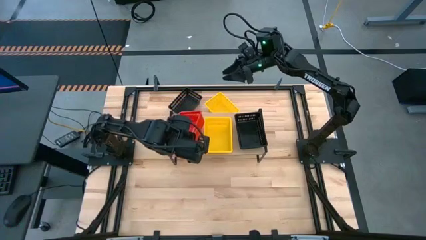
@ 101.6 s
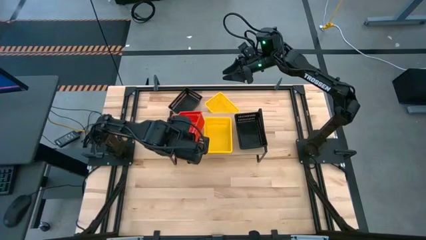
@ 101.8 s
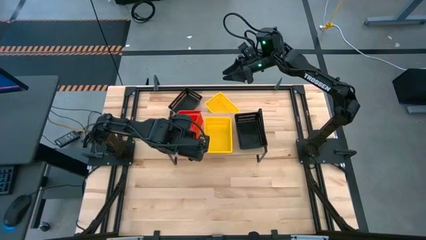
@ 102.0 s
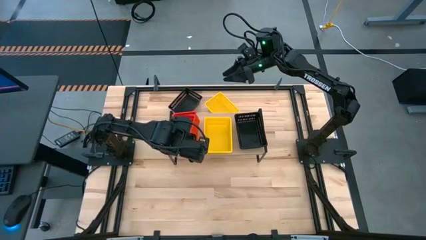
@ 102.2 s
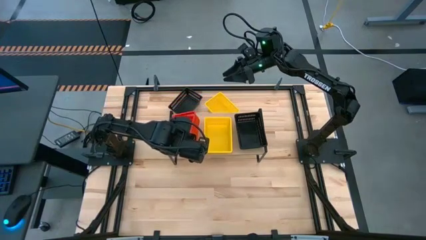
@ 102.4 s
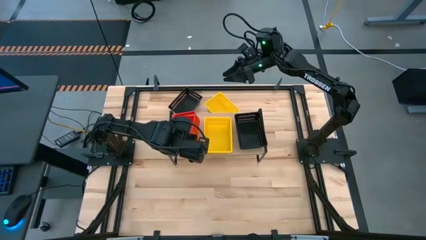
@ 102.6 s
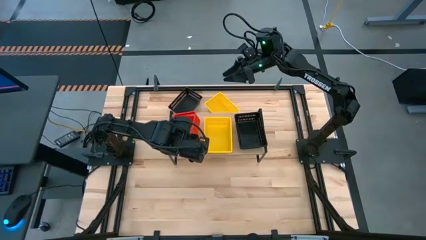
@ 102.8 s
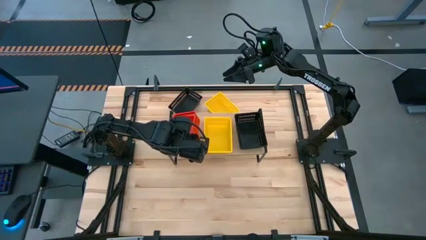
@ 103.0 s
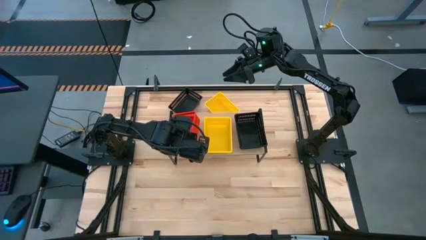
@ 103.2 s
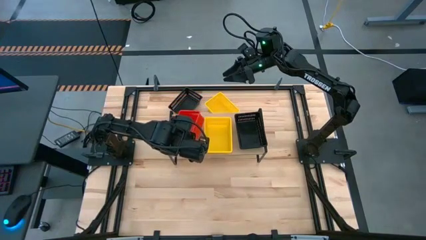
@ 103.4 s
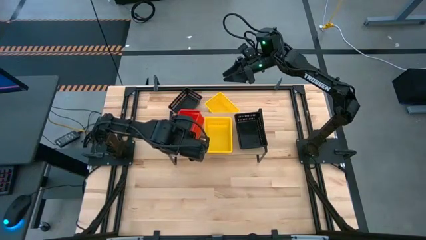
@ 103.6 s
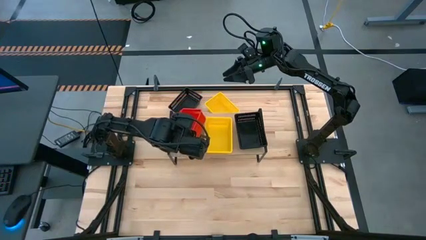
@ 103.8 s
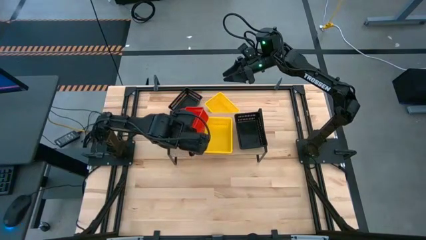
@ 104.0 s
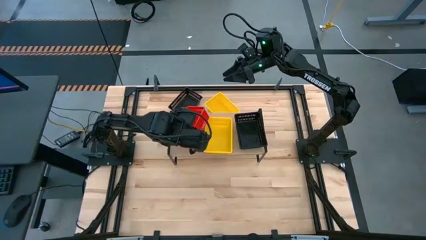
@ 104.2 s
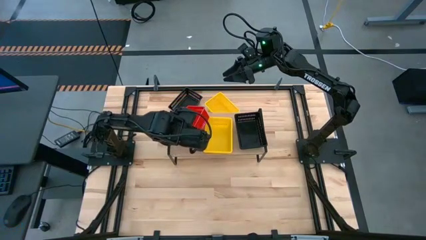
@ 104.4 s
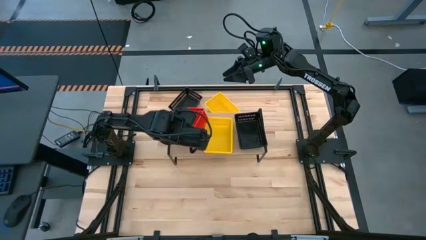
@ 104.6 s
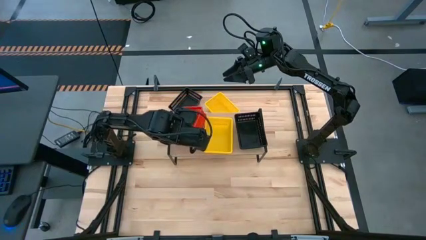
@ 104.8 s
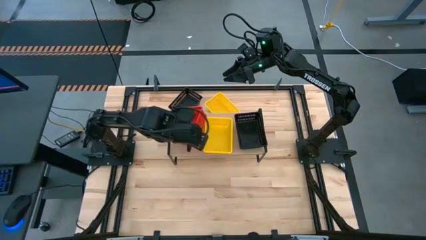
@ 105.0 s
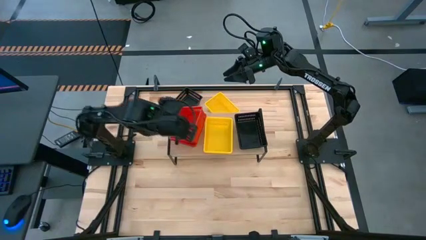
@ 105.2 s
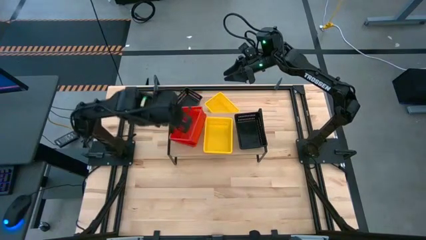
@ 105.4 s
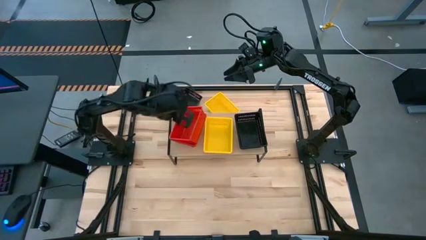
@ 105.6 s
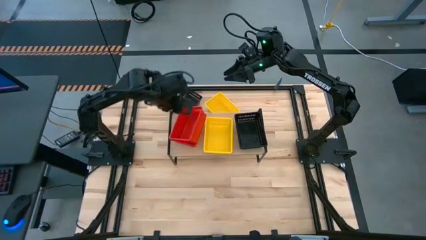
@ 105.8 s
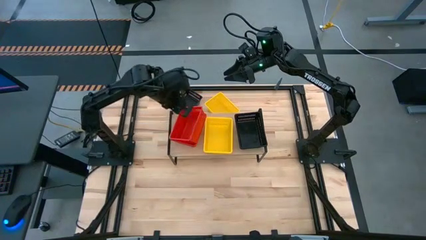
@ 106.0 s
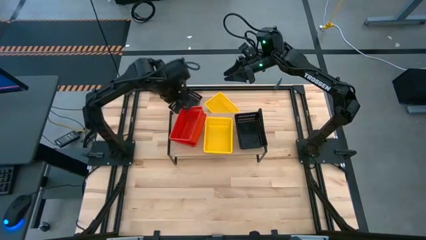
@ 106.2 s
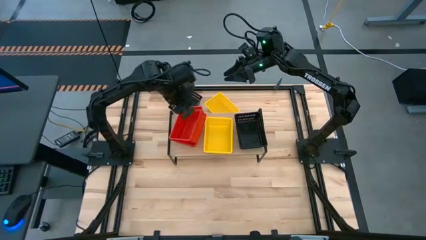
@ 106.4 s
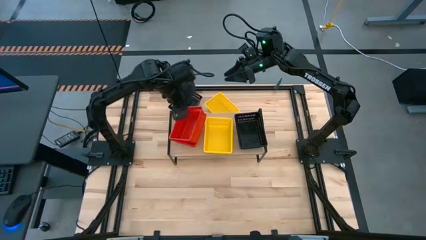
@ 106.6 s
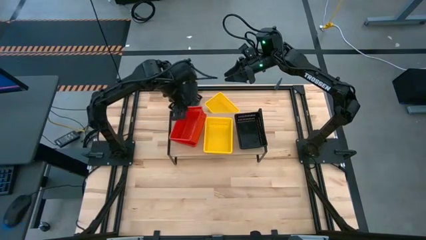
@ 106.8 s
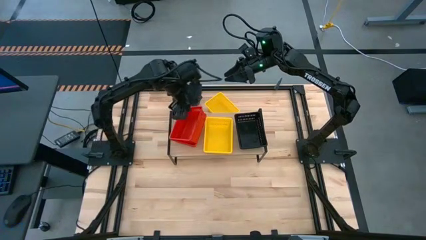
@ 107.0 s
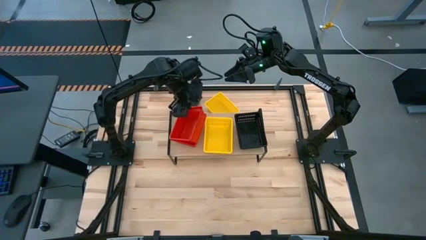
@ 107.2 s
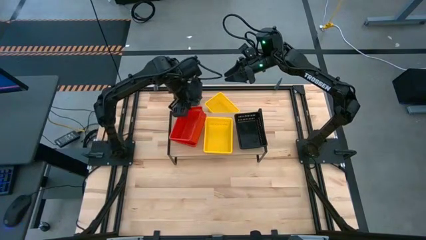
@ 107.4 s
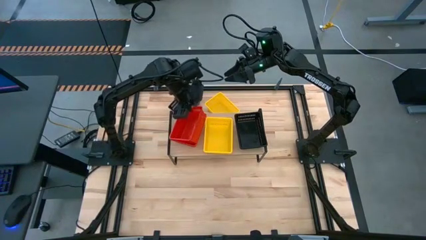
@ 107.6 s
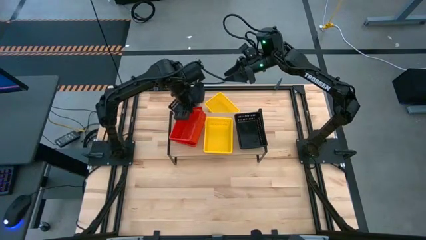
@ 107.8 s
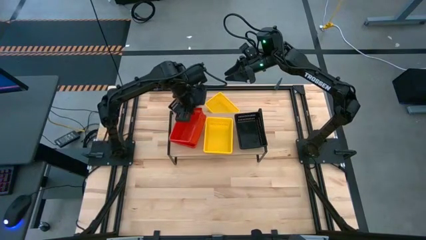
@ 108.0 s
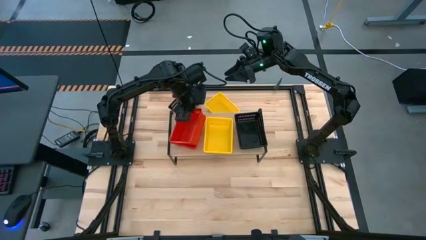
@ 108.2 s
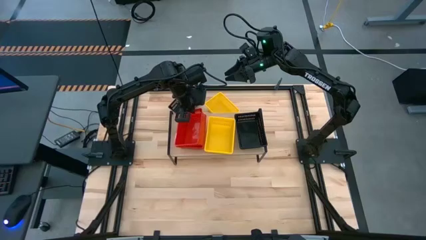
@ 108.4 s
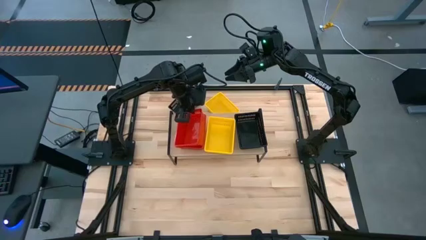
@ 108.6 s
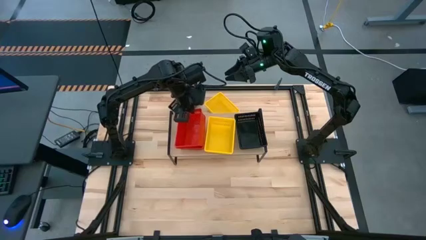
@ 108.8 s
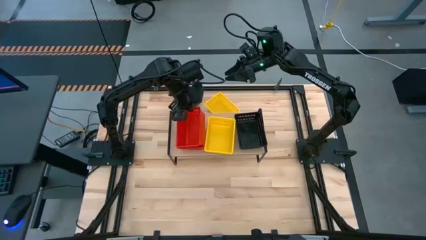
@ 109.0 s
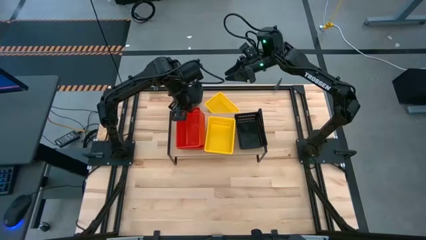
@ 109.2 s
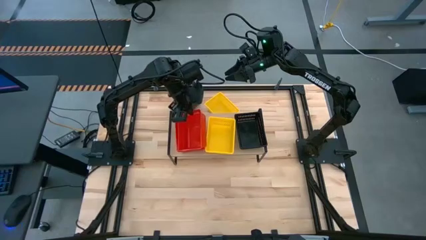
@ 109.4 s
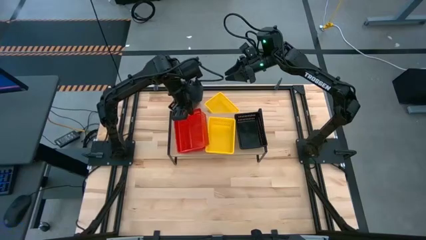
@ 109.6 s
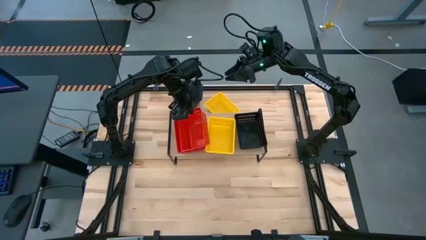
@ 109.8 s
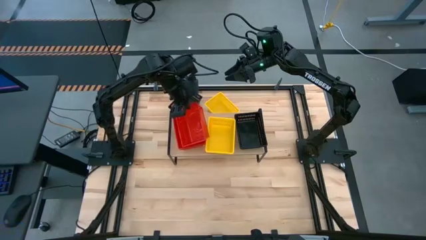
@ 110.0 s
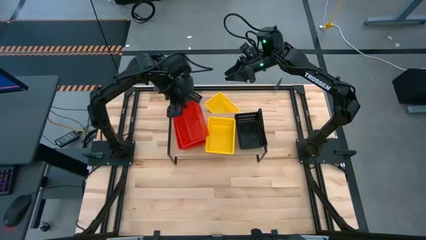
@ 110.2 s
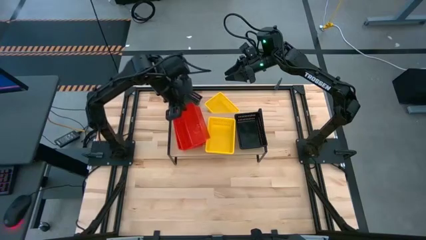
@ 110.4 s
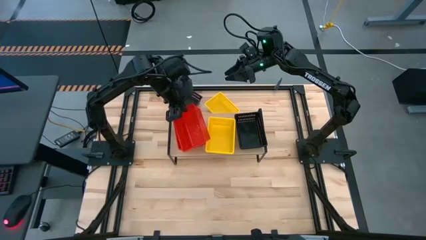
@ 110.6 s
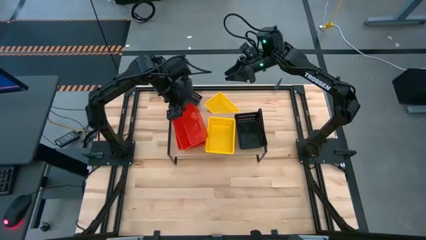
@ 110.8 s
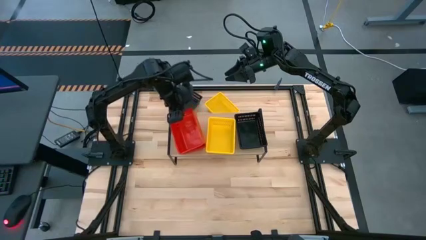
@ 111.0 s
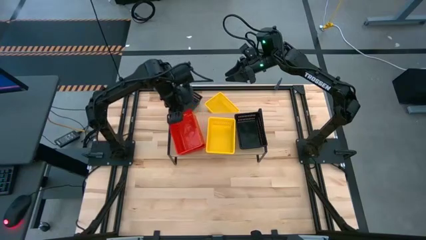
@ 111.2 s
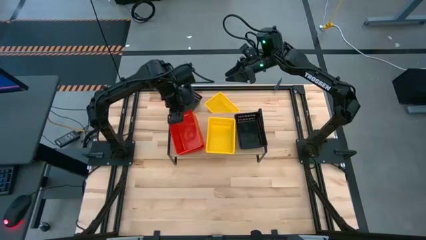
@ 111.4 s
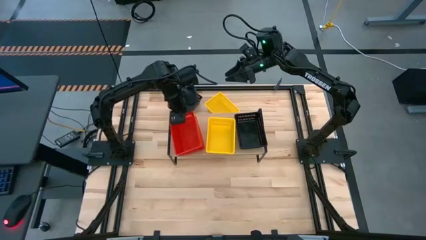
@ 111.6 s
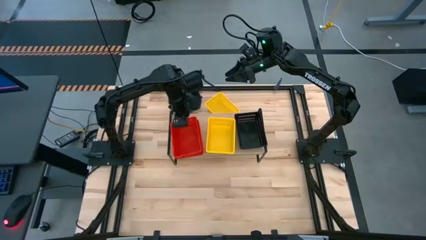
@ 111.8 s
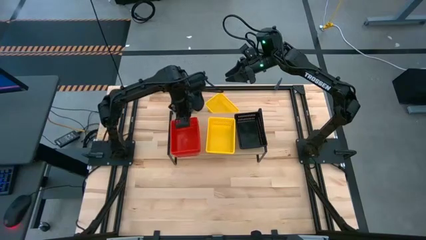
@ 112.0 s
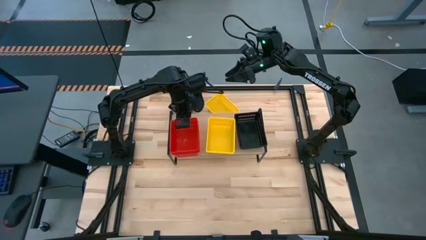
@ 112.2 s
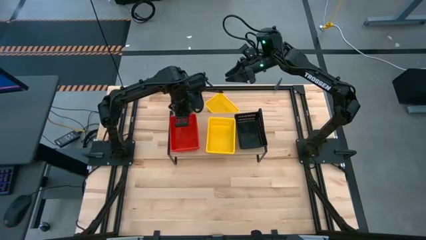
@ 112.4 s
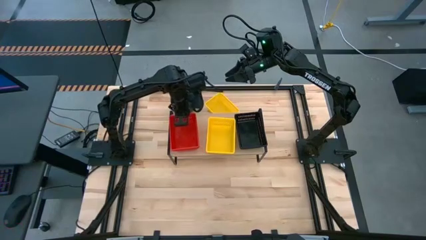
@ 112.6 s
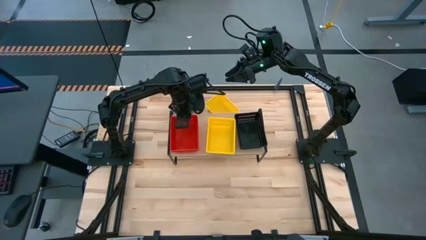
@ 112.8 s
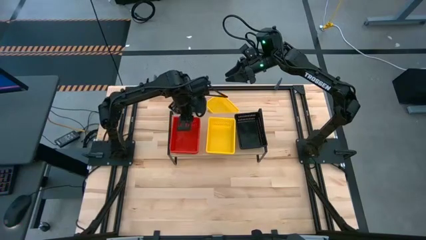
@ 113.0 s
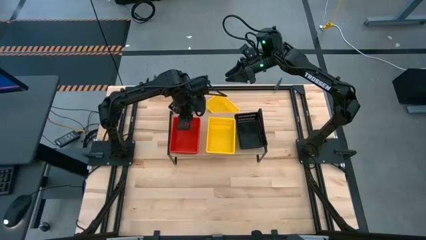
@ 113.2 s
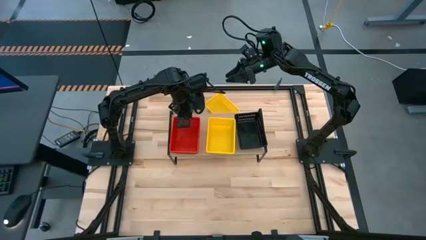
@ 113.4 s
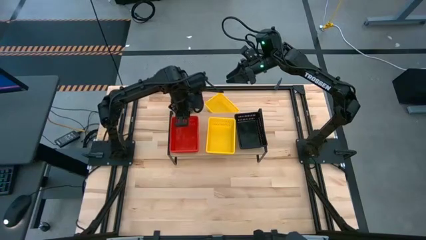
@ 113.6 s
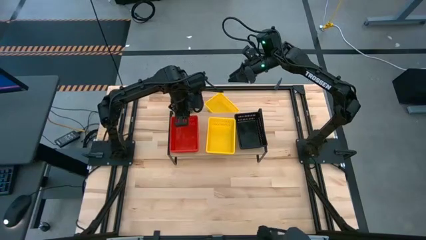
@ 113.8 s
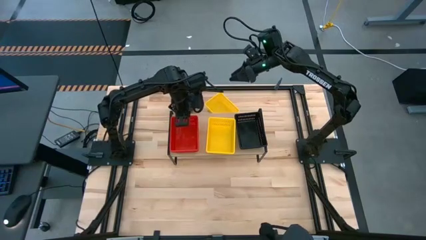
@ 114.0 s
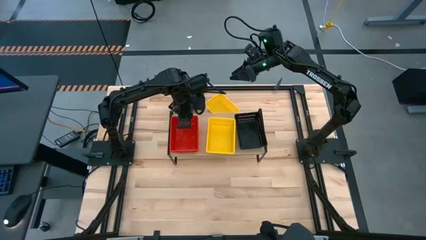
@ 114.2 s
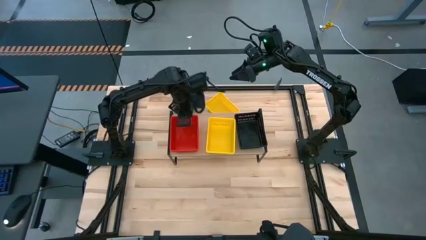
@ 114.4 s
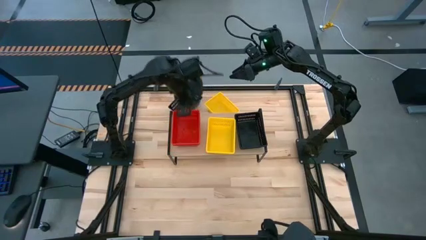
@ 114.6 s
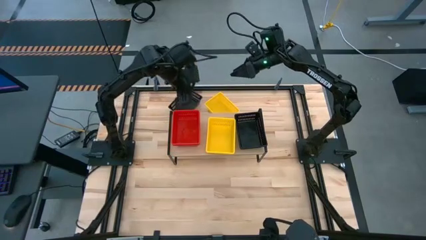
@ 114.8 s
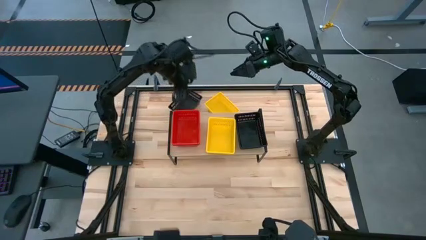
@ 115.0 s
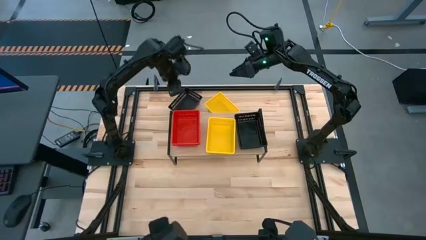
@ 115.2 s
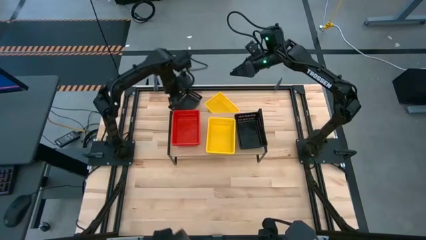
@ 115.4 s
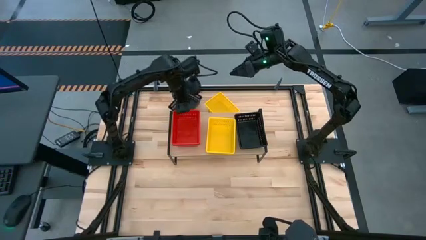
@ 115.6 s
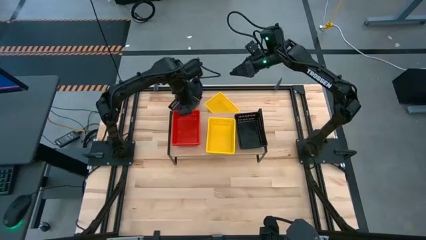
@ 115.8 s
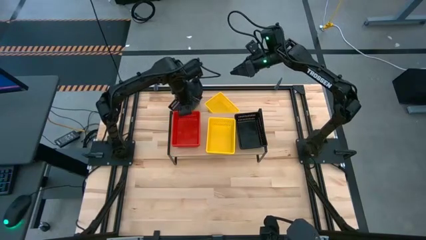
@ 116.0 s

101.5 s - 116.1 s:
Task: Stack baskets on shelf by color
Stack the red bin on top of the red bin on the shelf

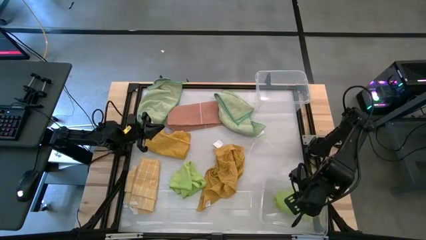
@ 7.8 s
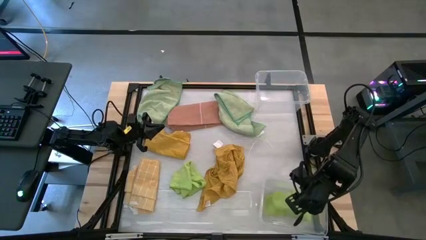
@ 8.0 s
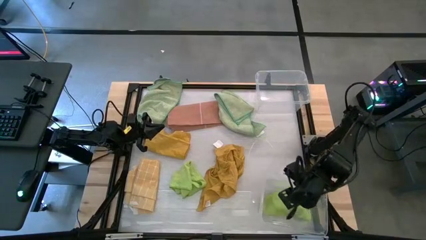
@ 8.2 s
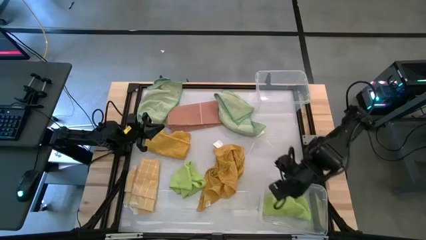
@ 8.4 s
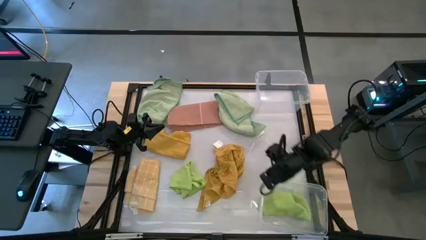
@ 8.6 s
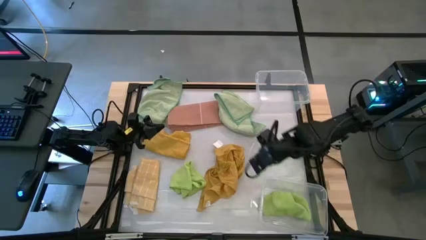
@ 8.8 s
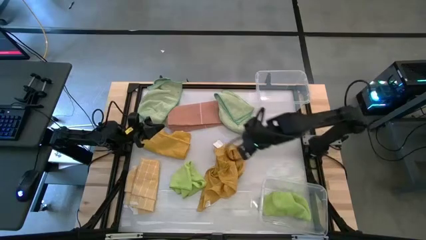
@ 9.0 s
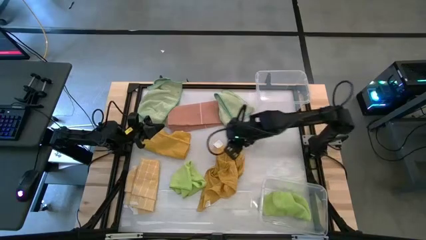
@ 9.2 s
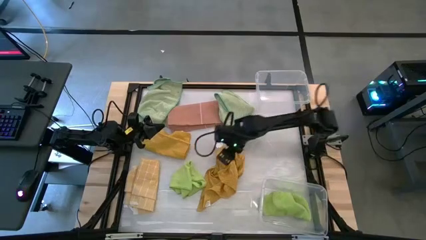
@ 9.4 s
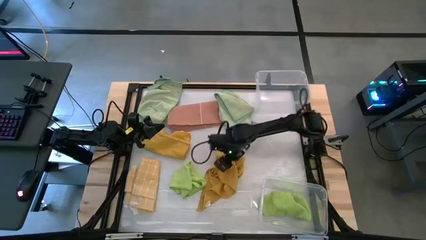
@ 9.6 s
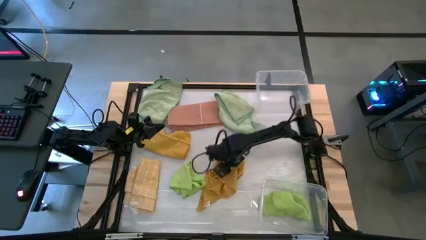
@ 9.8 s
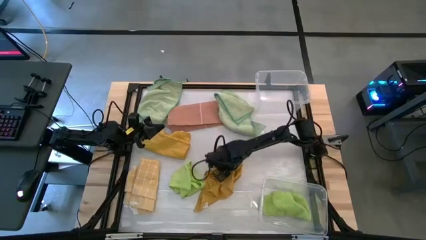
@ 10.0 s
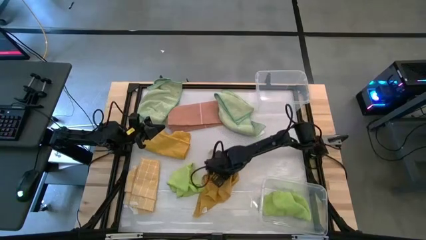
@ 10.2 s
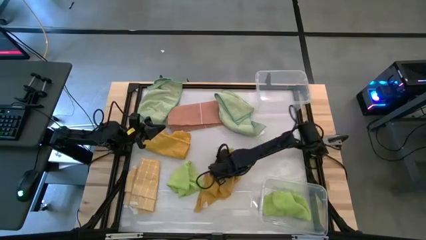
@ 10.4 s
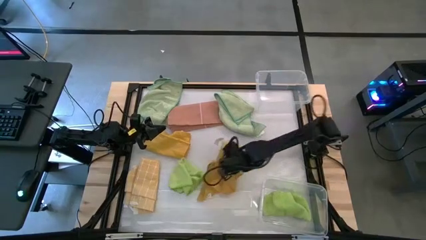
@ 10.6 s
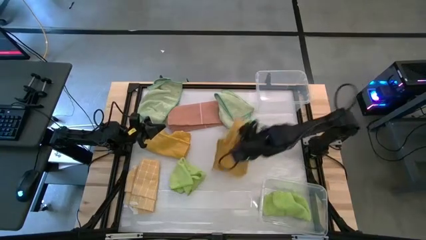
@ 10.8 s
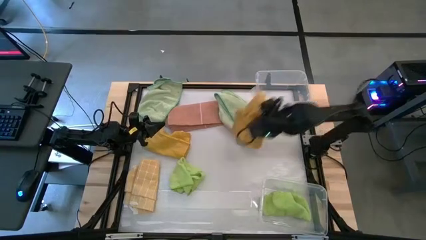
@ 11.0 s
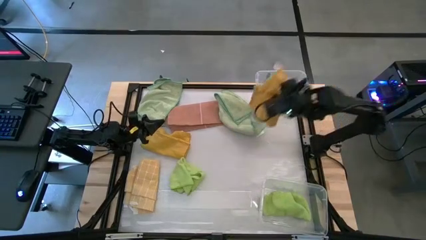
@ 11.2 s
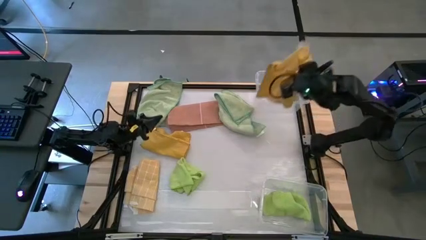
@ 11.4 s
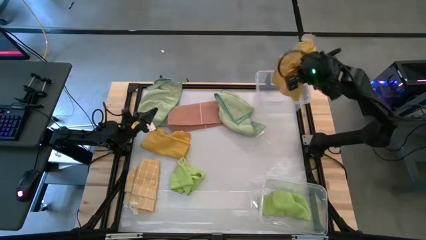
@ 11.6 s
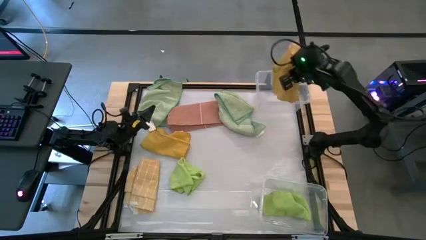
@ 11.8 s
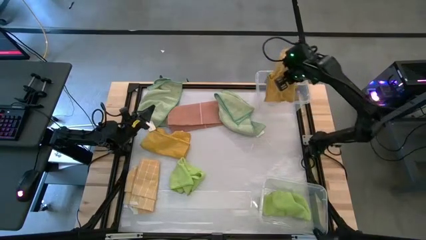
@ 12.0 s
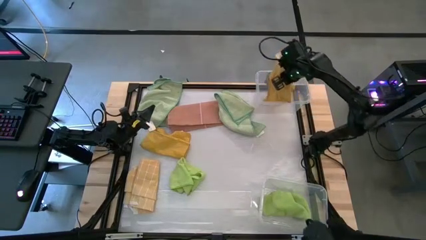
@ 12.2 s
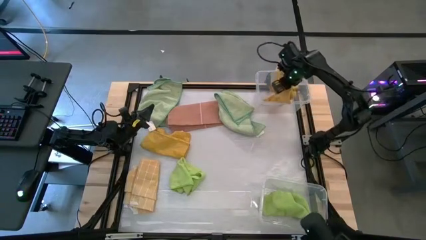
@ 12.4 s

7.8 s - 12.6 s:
Task: Sort microfiber towel by color & place in baskets
Put the yellow towel into the top transparent bin
